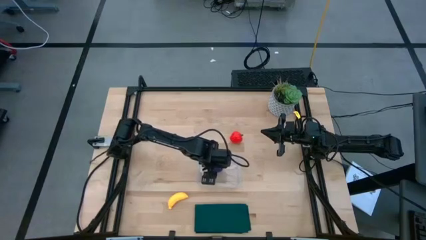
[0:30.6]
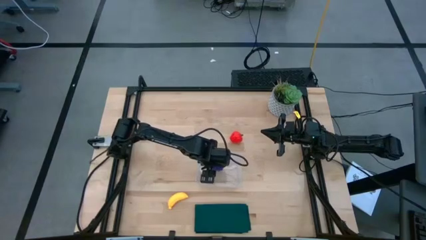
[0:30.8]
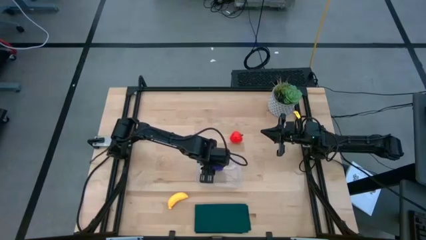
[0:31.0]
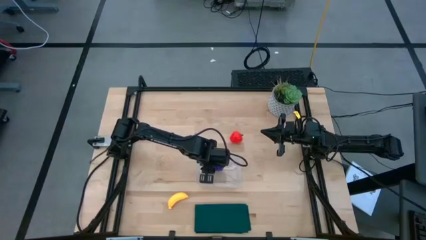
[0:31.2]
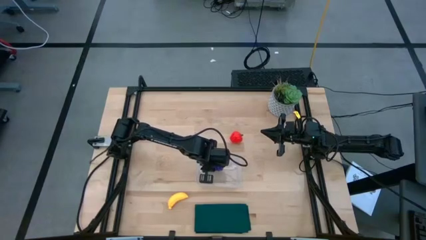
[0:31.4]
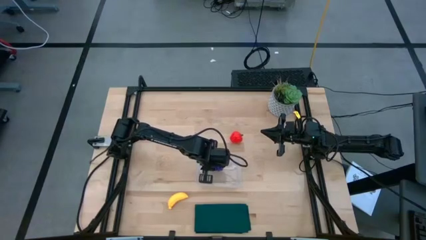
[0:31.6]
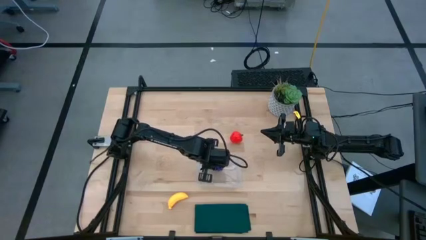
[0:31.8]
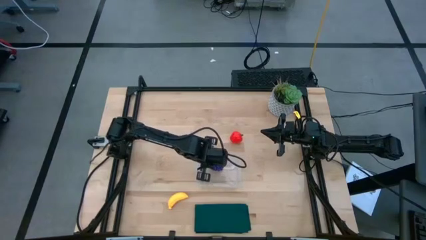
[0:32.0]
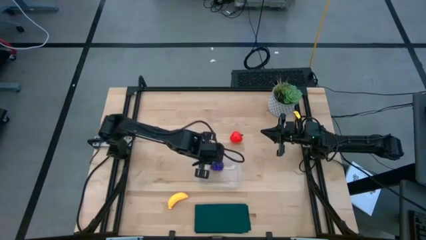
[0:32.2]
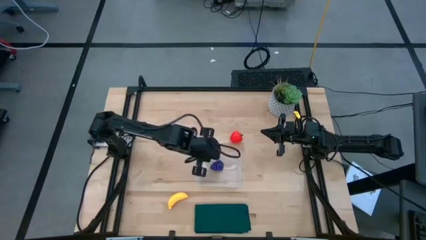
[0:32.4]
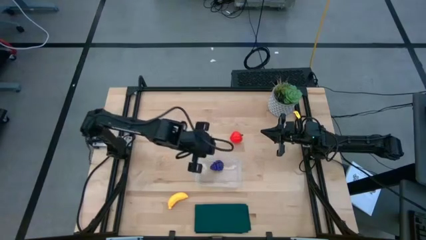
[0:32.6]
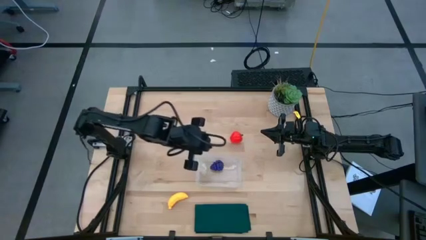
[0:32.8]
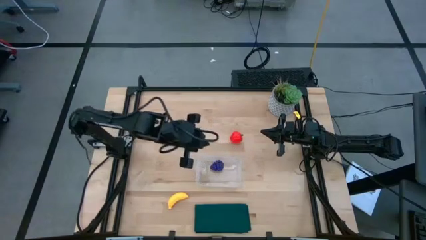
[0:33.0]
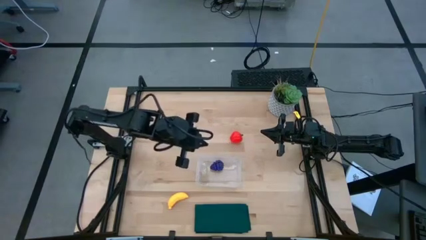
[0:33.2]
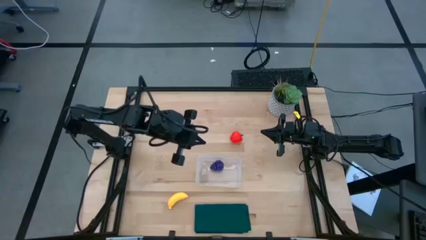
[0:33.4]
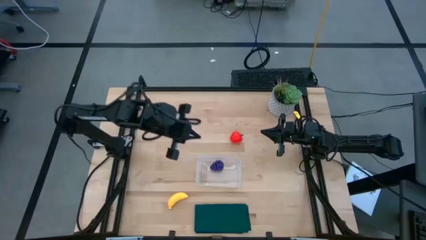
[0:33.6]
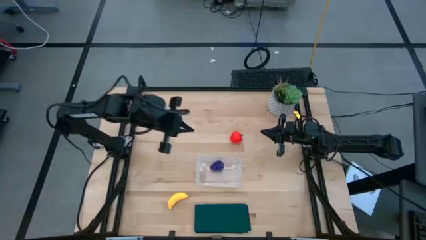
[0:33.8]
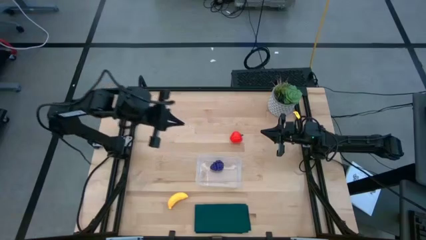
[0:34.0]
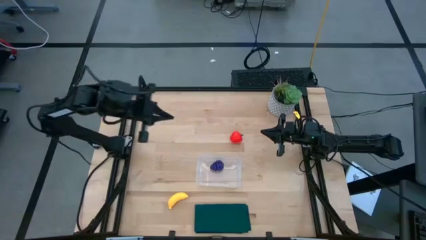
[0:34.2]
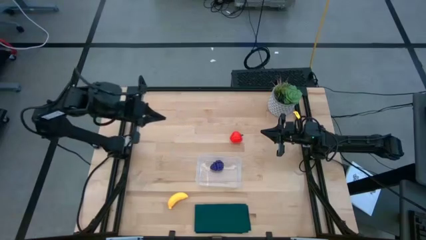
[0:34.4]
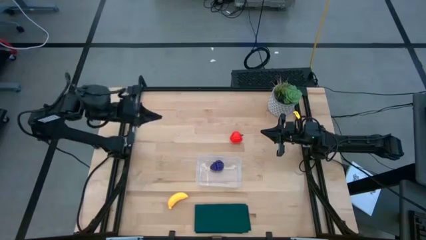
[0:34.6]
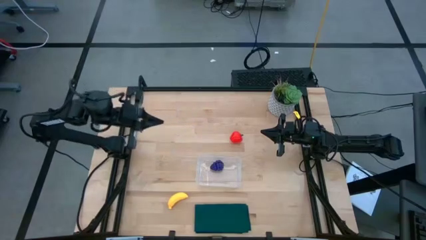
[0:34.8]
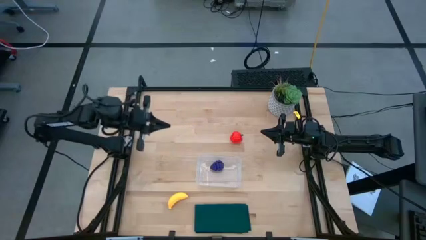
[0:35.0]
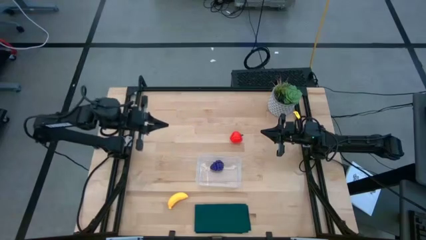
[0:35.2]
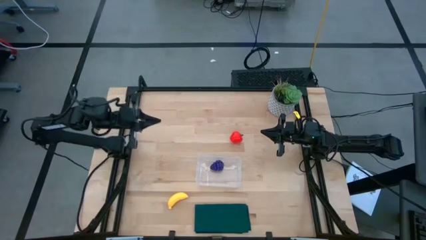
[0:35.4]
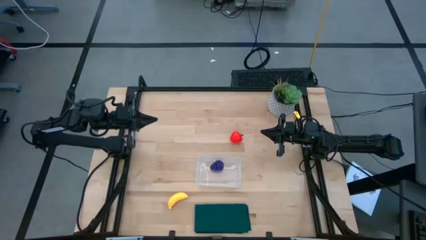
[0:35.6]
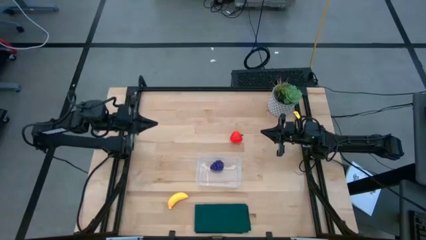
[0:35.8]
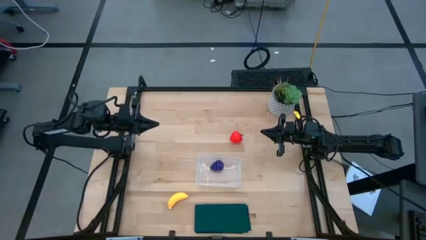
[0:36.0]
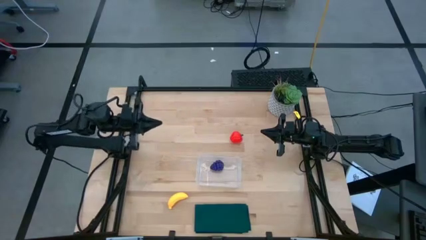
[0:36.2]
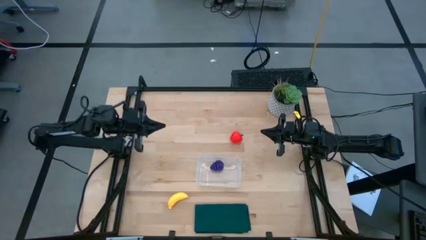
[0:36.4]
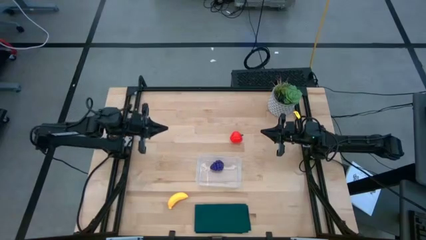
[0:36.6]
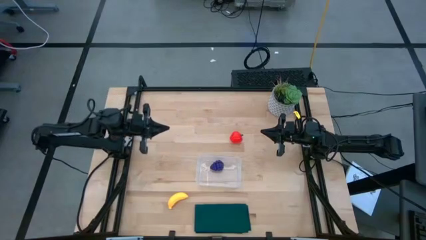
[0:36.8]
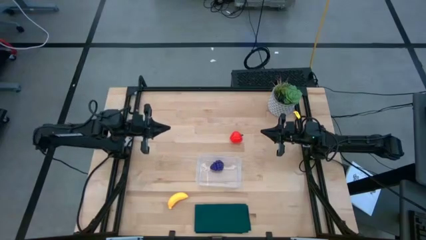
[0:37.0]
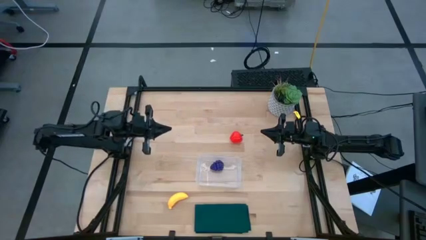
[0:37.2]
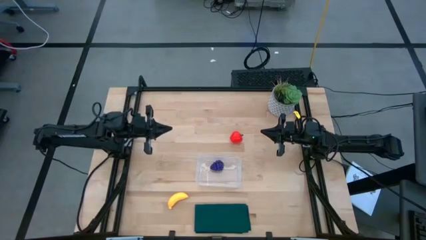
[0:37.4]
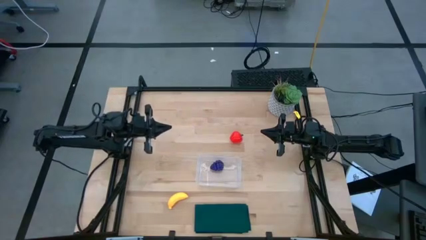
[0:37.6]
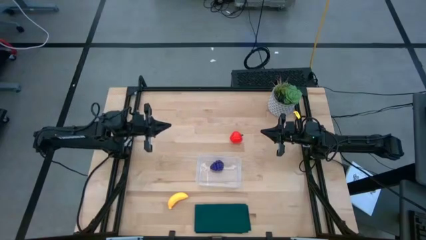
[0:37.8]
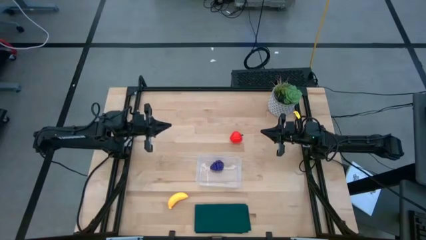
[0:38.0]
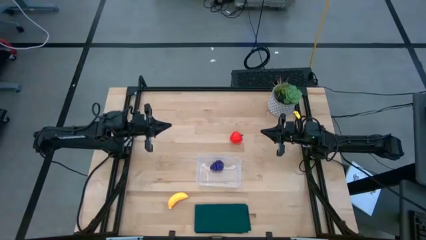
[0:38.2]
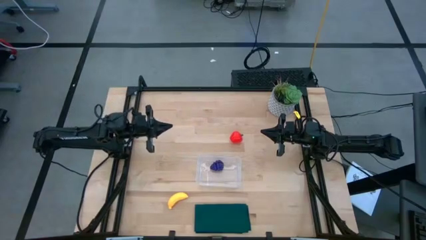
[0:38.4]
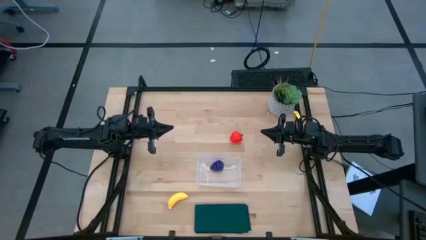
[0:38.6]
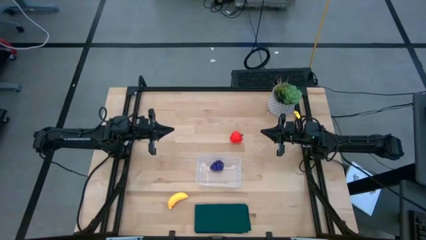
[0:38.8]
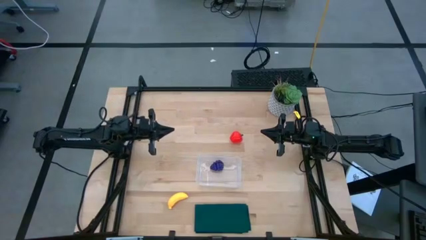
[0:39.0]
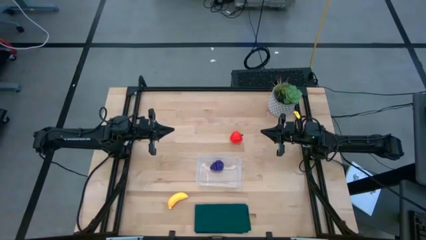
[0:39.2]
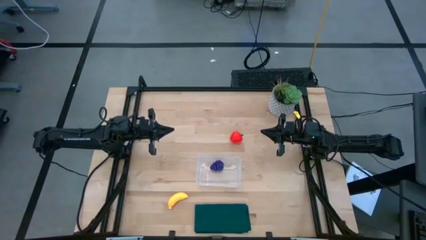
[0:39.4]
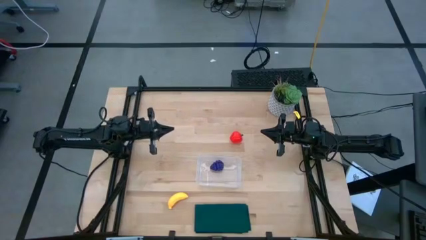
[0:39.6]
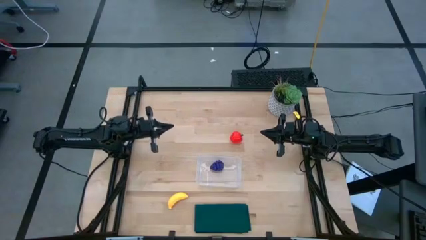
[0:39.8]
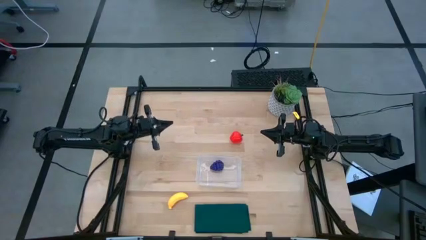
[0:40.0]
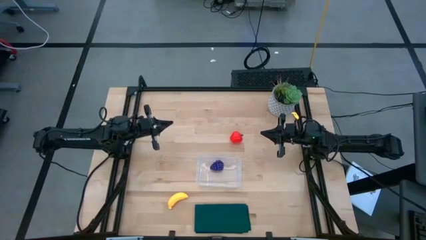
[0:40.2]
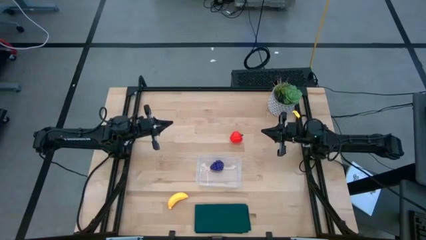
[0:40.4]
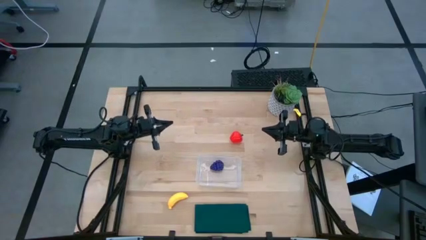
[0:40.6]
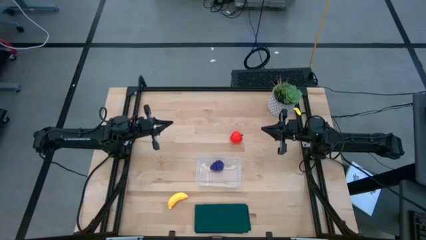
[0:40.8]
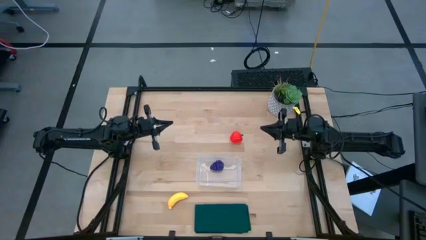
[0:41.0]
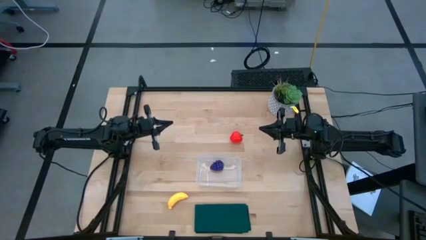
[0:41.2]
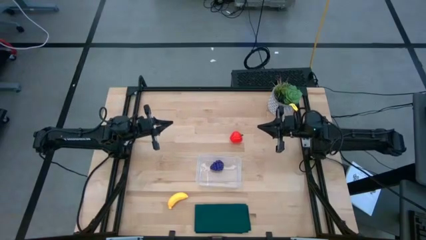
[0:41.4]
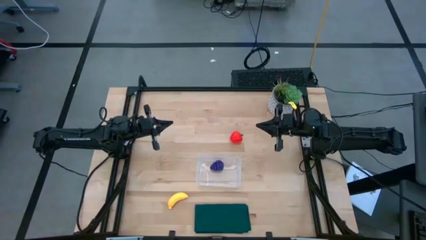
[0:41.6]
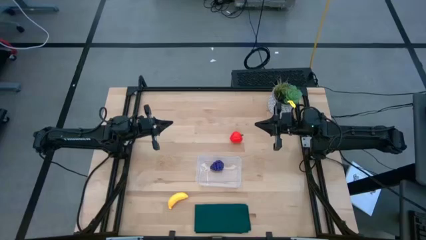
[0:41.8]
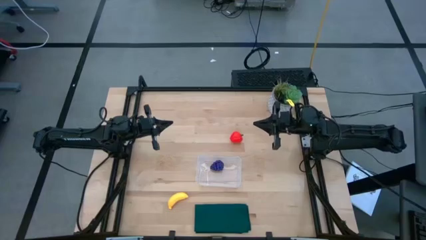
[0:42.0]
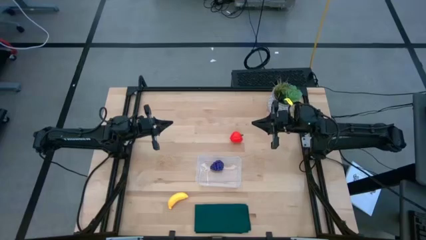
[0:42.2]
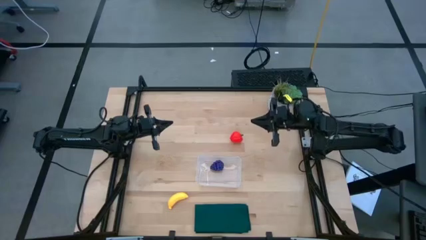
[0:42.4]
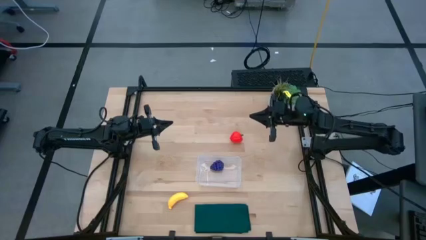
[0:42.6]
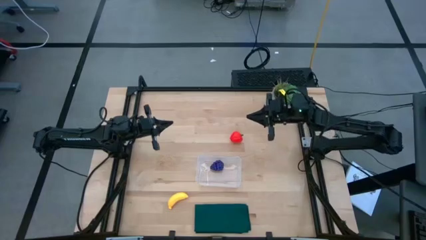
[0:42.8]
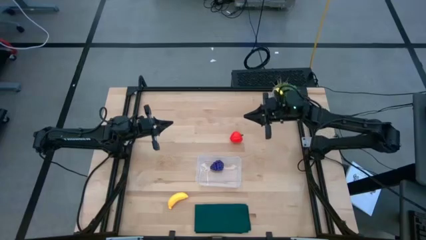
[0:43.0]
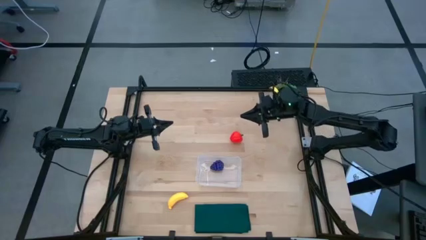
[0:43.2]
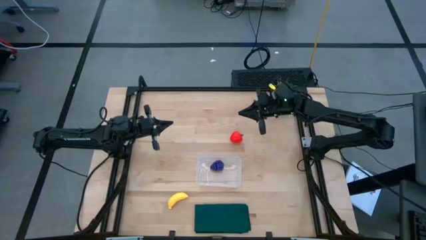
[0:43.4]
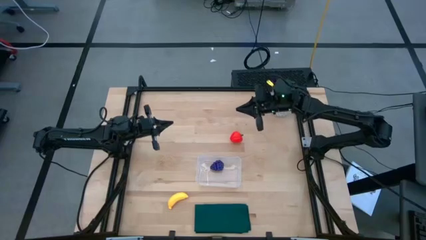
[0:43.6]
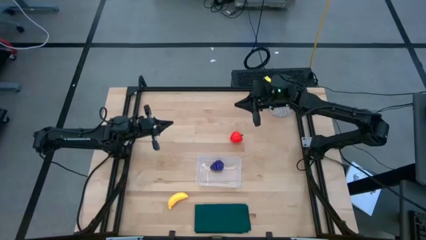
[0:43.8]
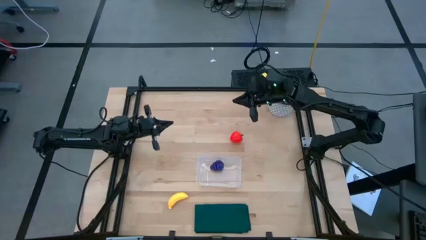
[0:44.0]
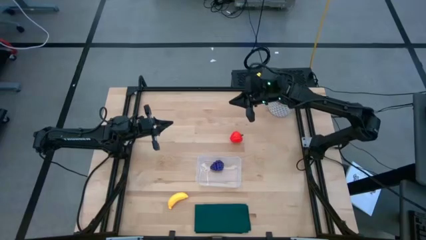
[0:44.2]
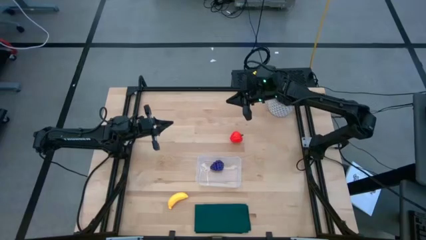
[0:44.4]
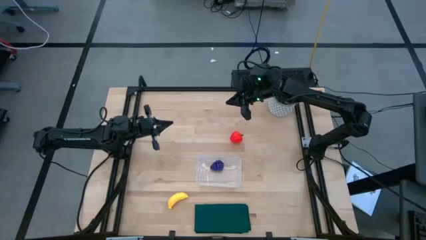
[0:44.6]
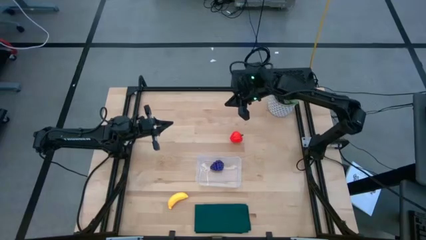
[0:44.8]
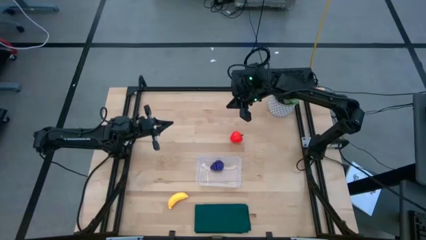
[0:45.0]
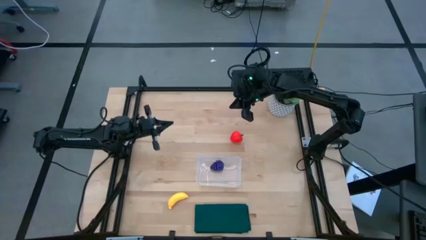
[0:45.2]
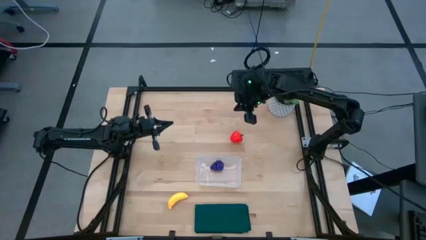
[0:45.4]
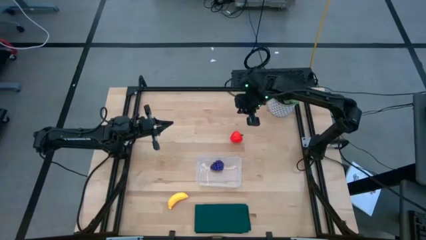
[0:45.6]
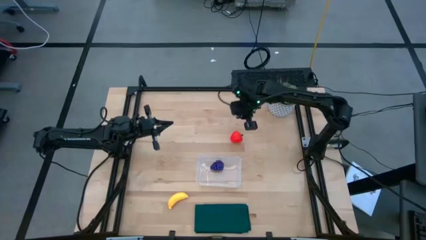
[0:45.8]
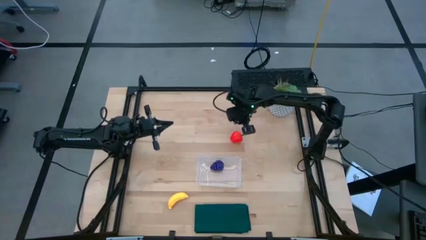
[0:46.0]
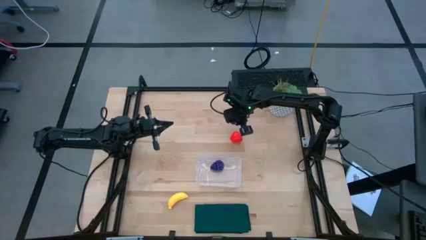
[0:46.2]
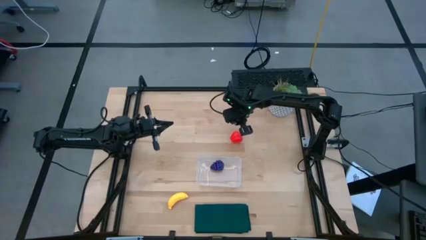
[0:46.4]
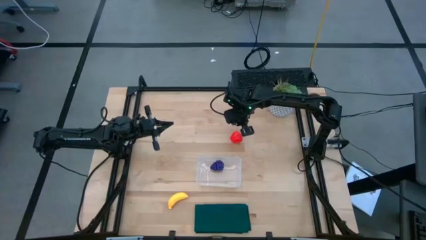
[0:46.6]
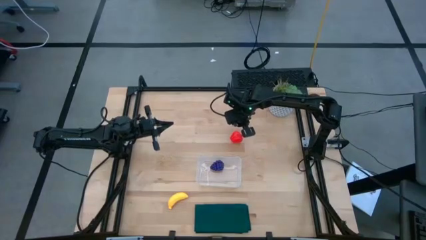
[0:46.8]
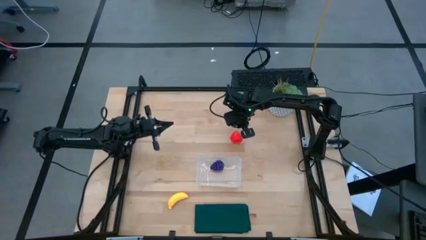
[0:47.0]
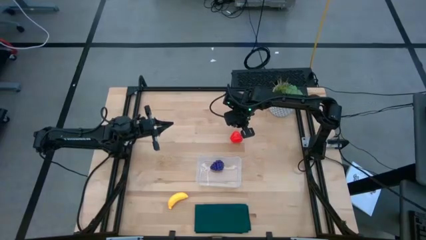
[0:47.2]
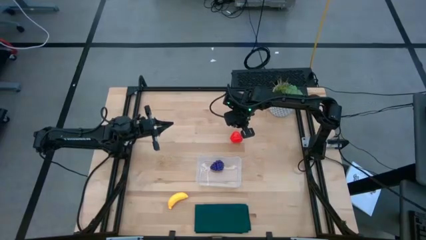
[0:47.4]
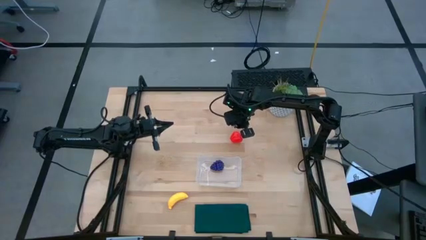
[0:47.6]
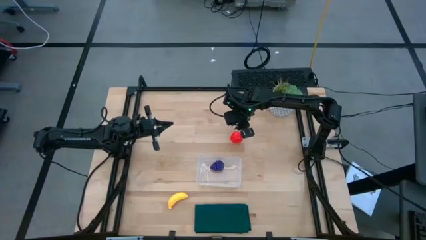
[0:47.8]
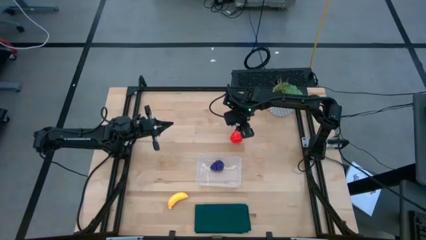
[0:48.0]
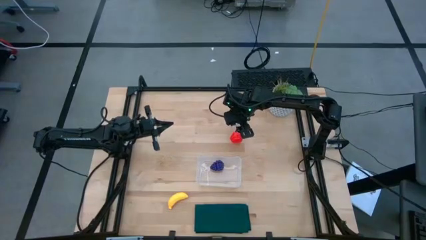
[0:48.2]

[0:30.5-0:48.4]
Task: Pick and placing Produce into tupperware
Put the apple into the transparent bin
